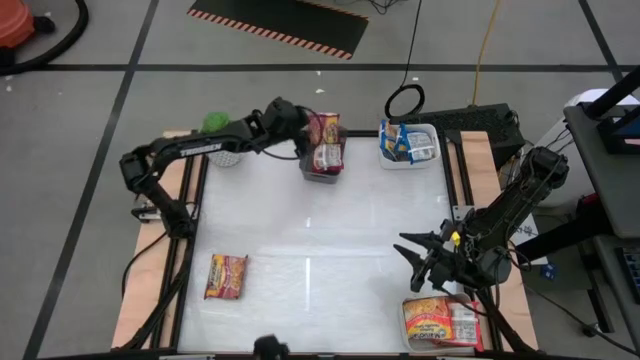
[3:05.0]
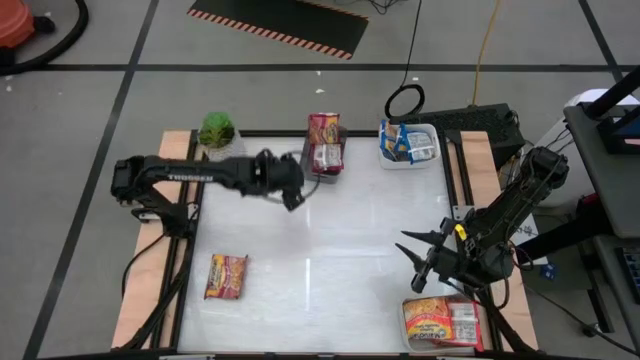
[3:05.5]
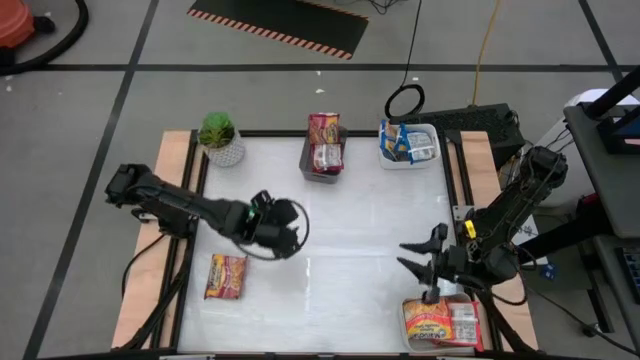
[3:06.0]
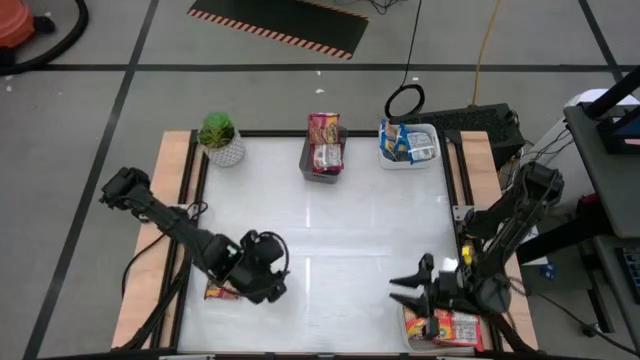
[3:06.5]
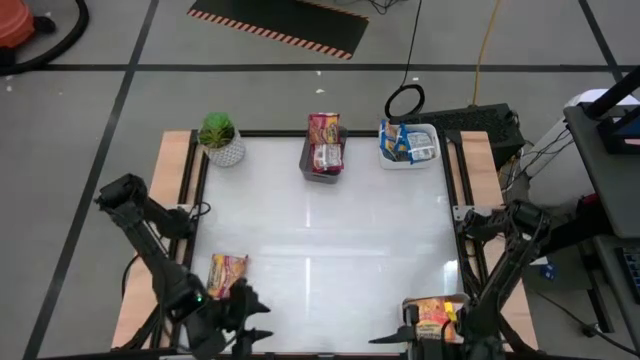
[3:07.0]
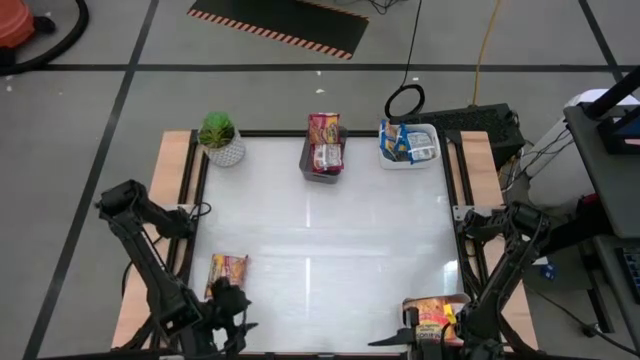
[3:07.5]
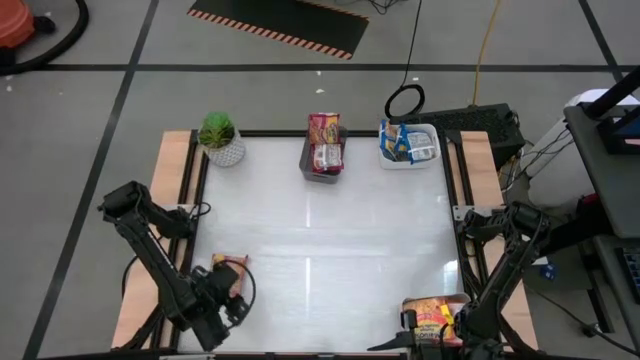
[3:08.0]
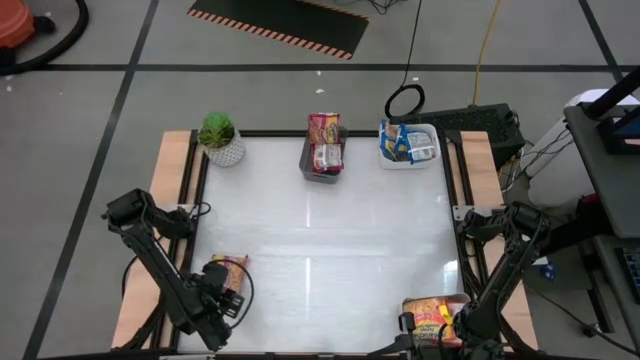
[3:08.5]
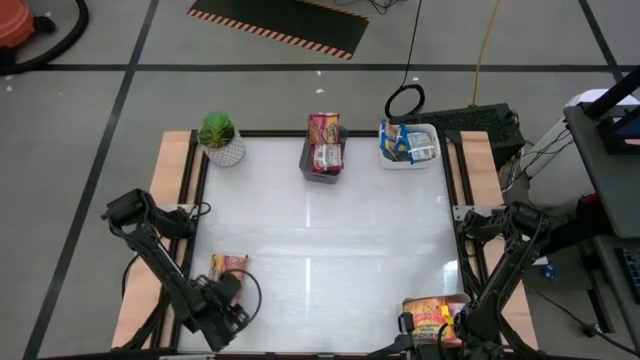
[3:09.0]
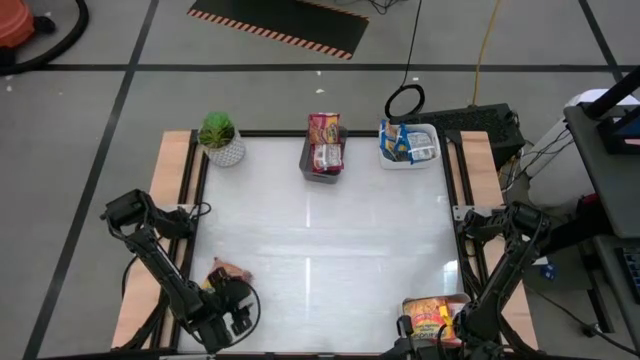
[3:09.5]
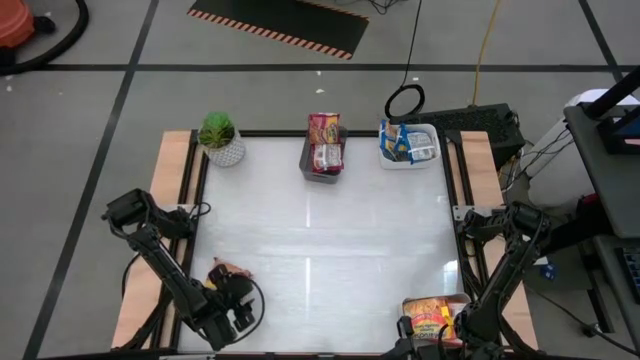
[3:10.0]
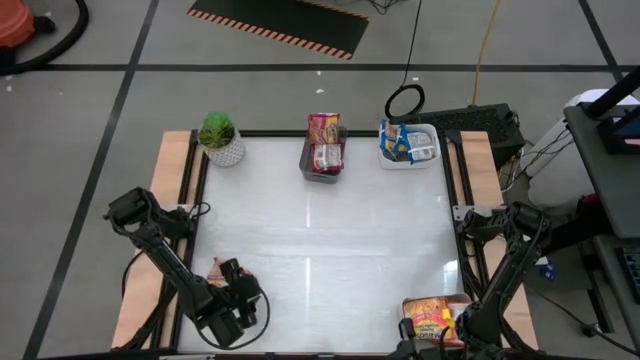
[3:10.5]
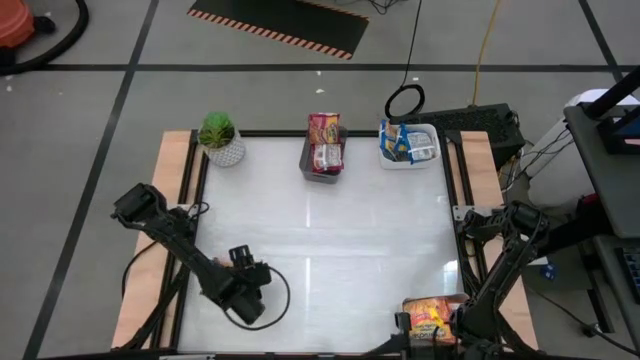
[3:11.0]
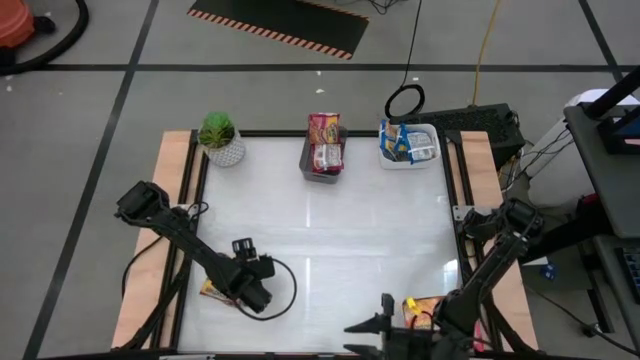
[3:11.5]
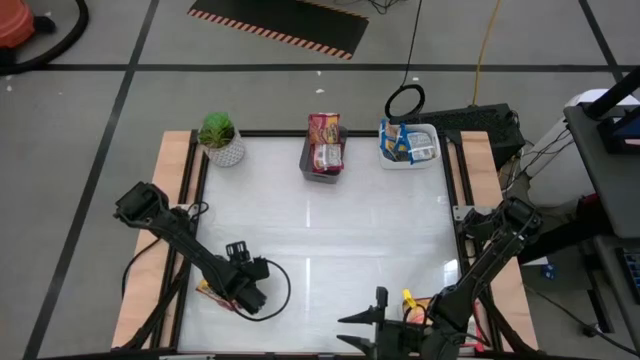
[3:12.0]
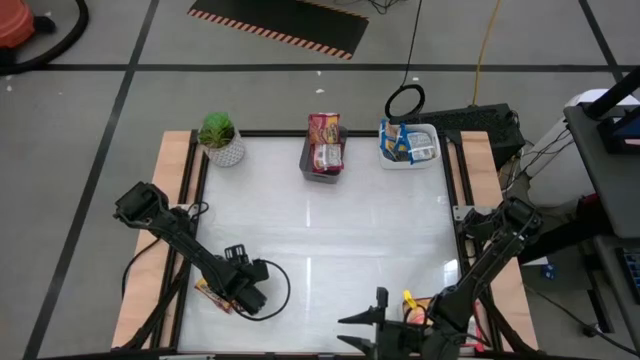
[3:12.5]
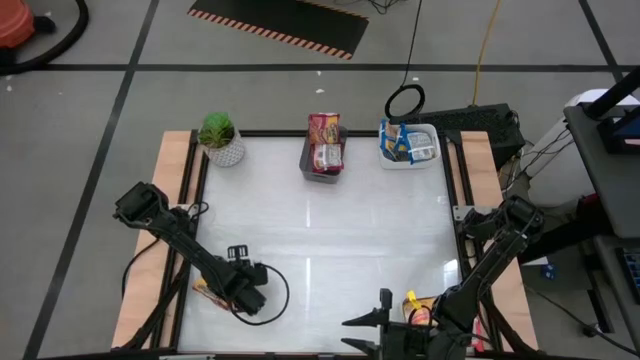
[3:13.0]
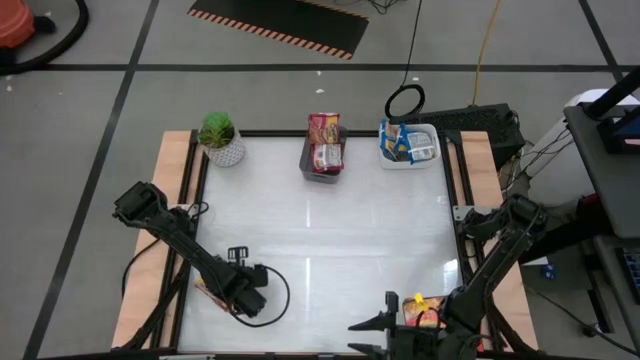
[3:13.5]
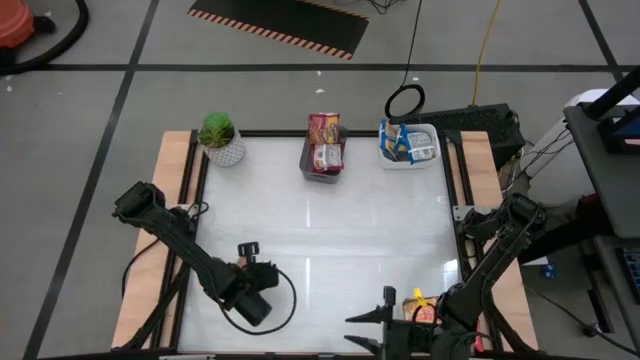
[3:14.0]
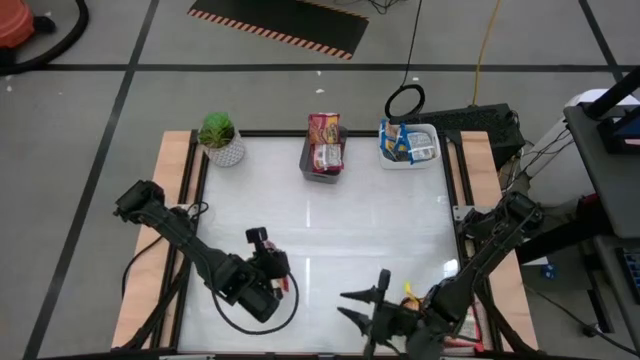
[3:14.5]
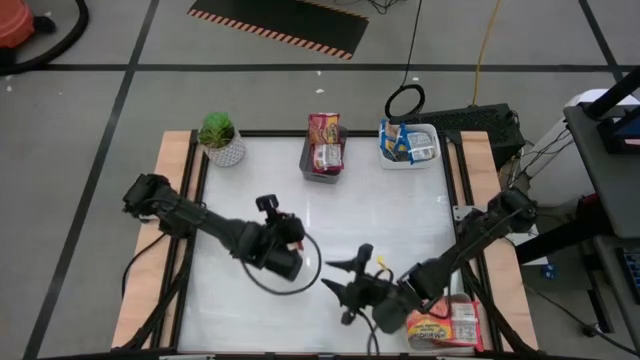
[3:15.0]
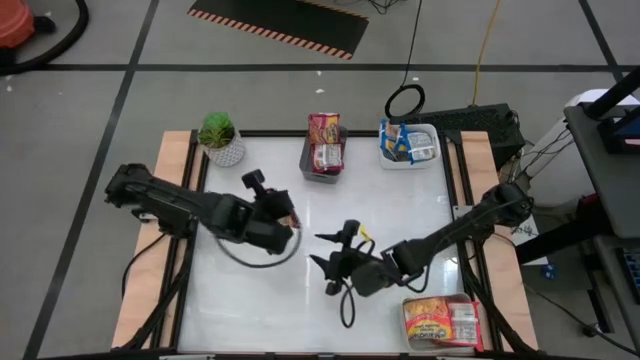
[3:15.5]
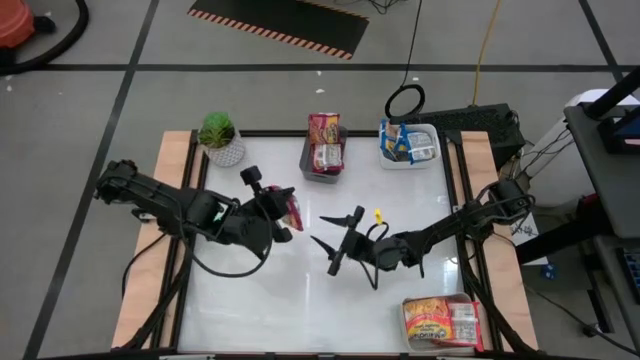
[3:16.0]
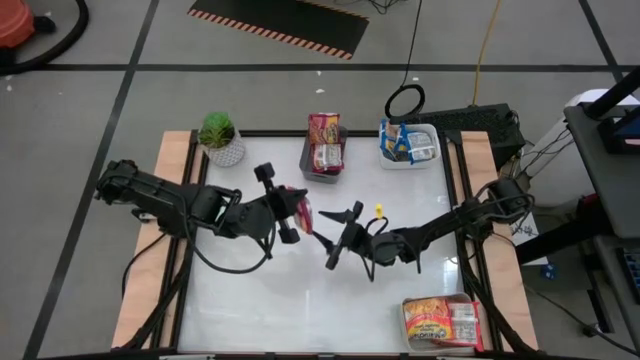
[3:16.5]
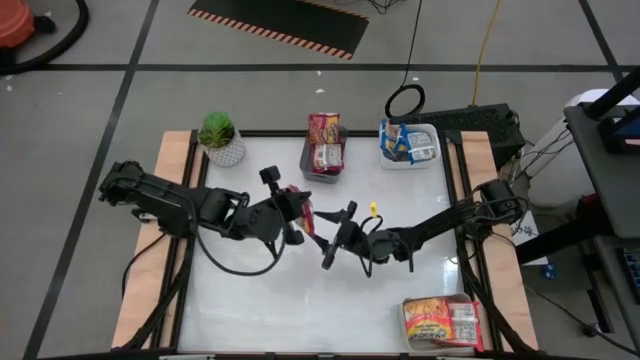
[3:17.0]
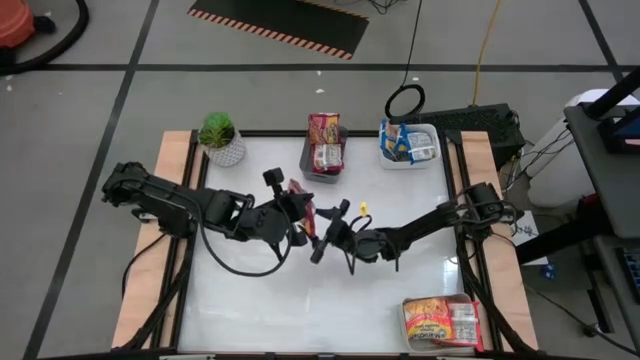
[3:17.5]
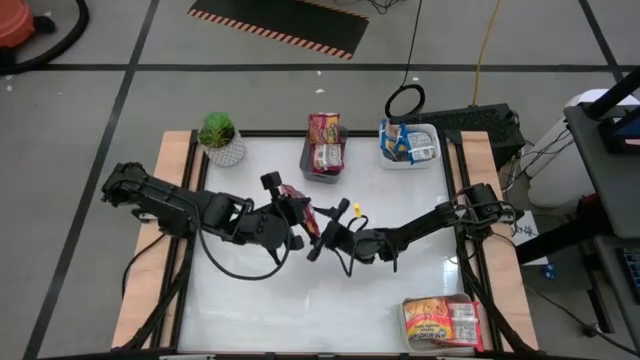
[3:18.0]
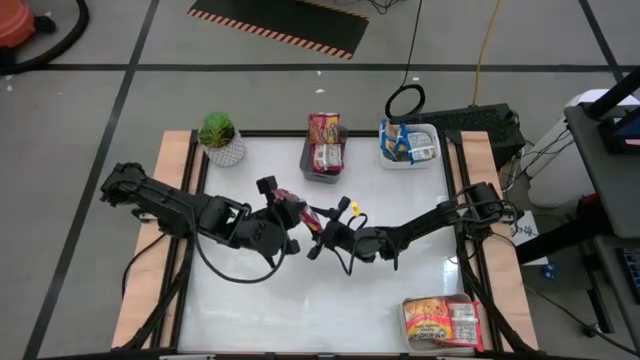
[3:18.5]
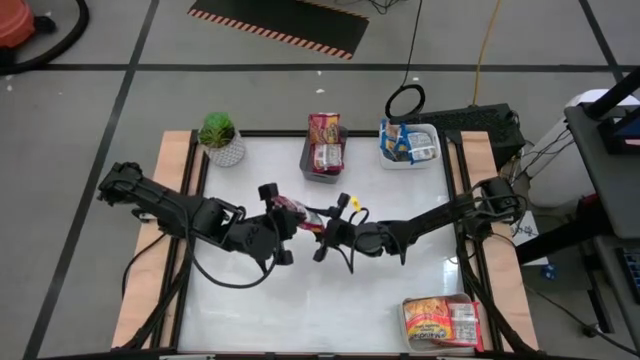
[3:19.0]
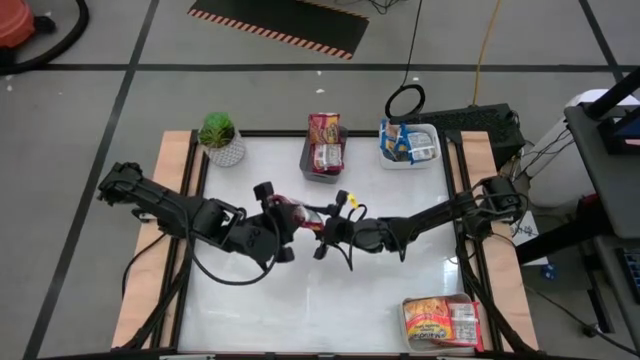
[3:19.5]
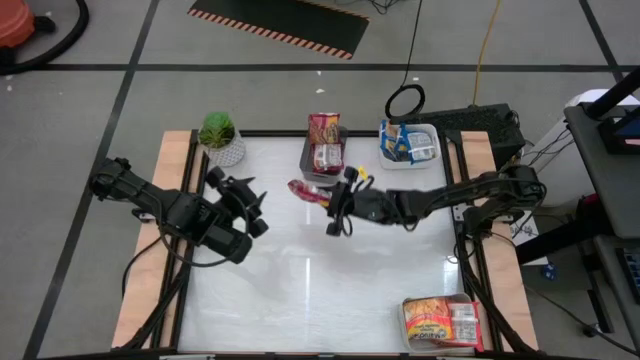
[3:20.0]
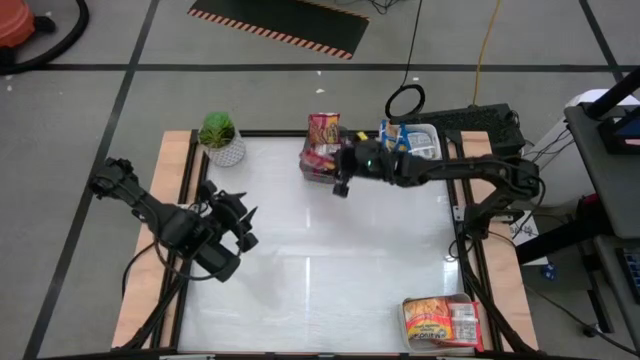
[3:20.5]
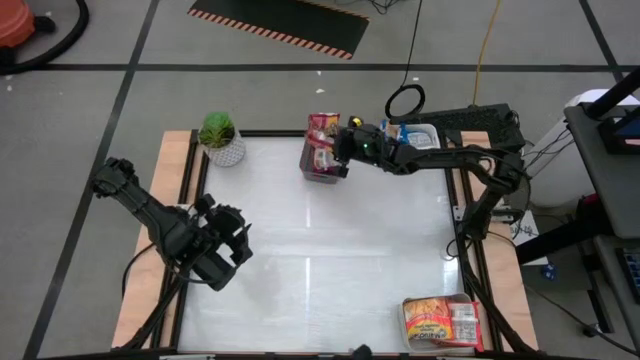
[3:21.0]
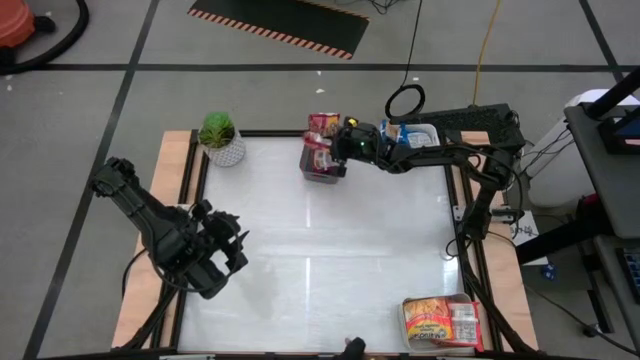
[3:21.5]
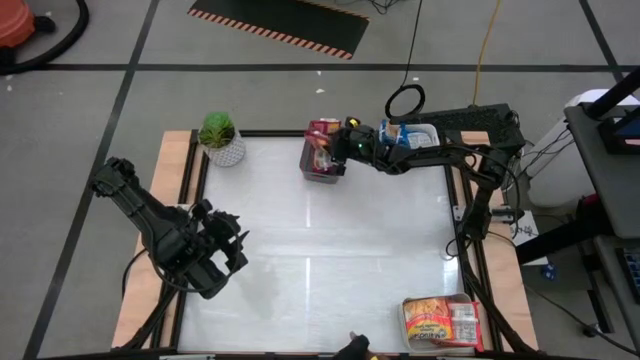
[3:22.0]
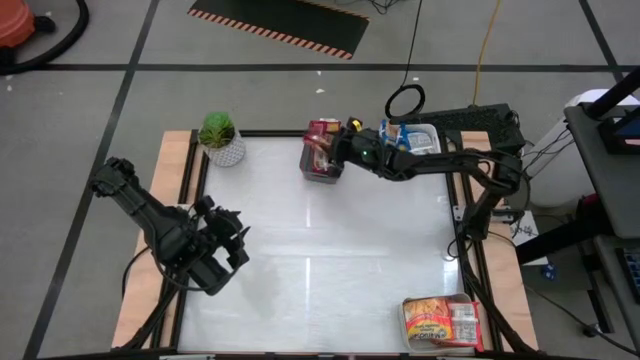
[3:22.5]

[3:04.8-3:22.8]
Task: Sort Maruchan noodles
Put the red noodle pack into the black bin

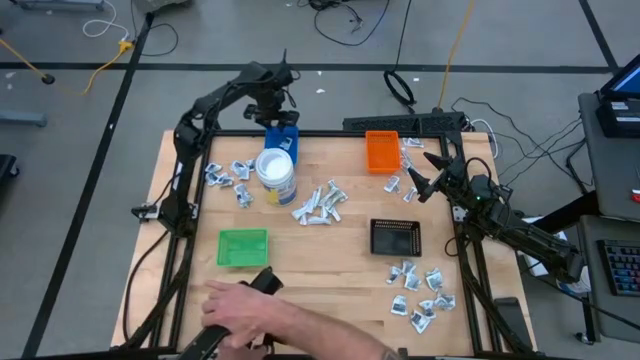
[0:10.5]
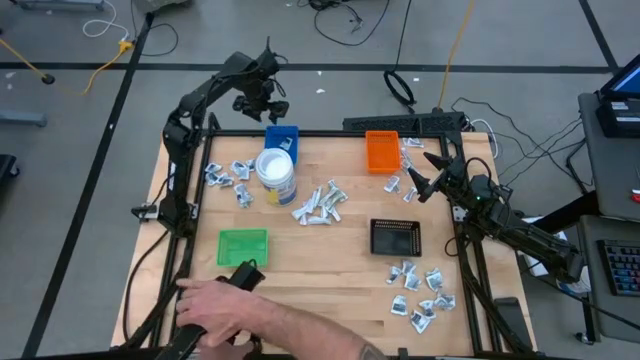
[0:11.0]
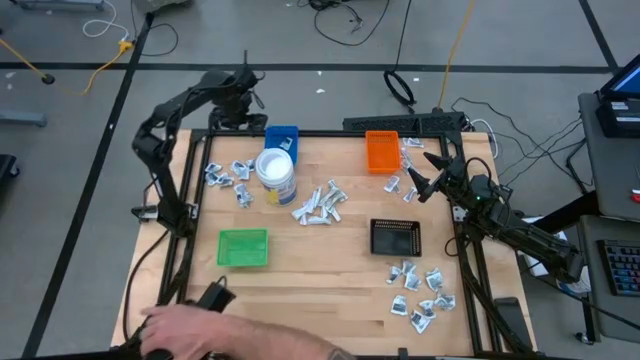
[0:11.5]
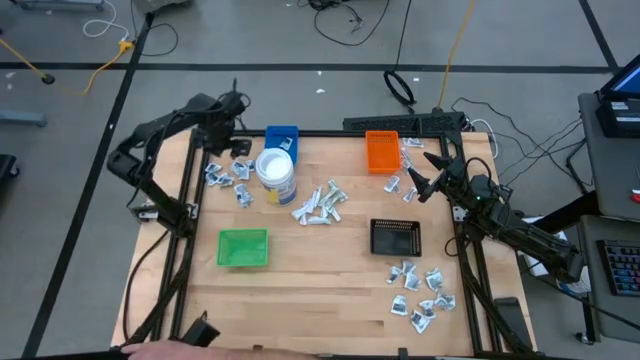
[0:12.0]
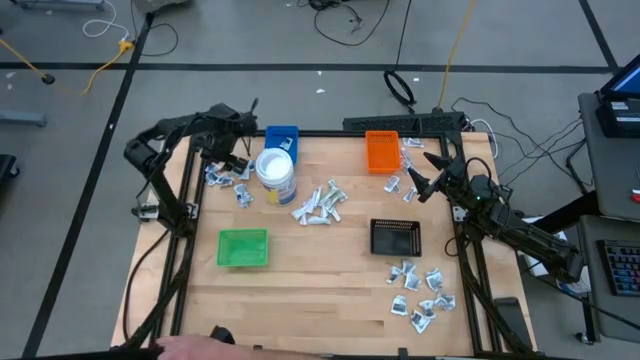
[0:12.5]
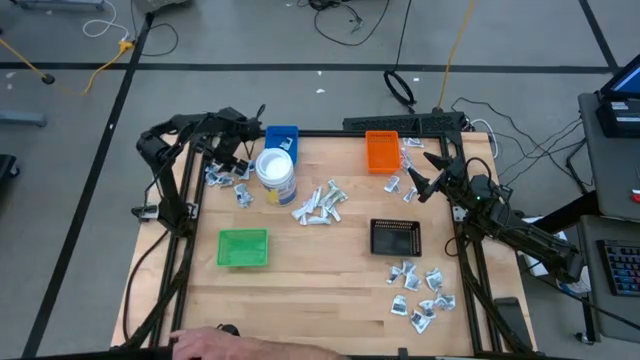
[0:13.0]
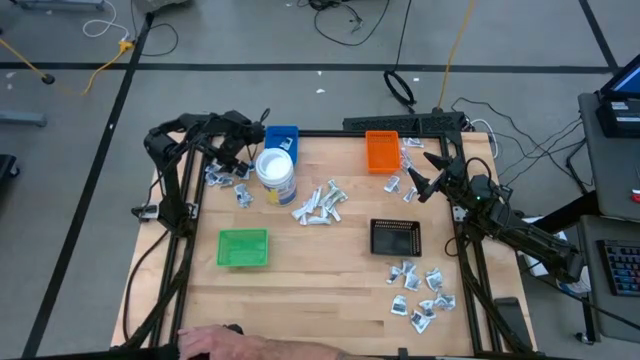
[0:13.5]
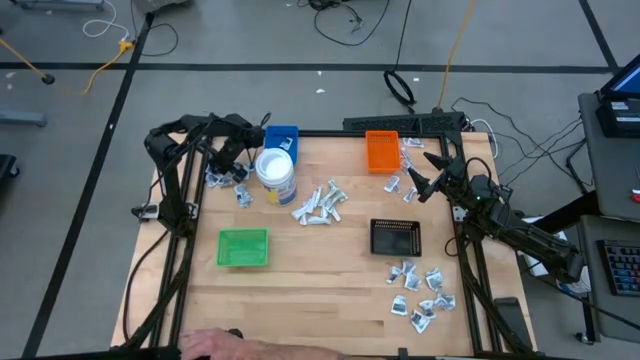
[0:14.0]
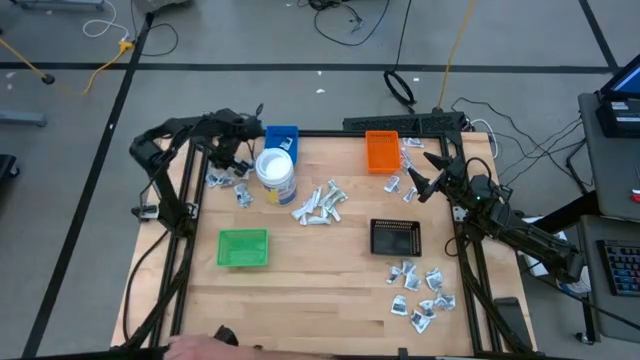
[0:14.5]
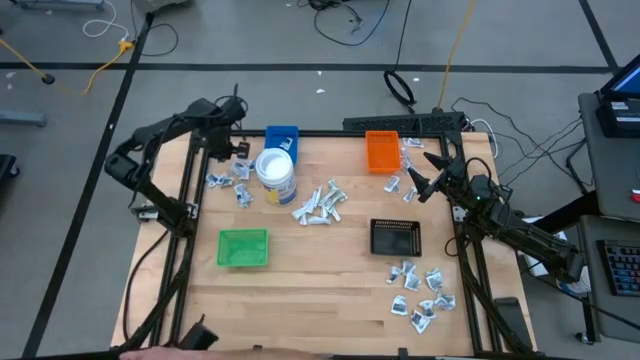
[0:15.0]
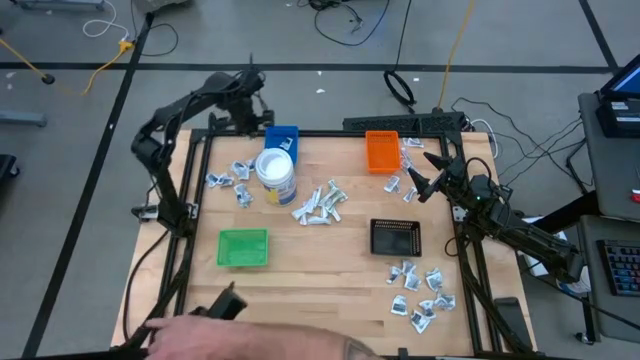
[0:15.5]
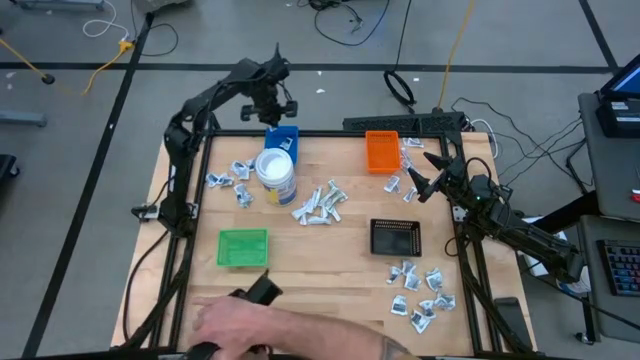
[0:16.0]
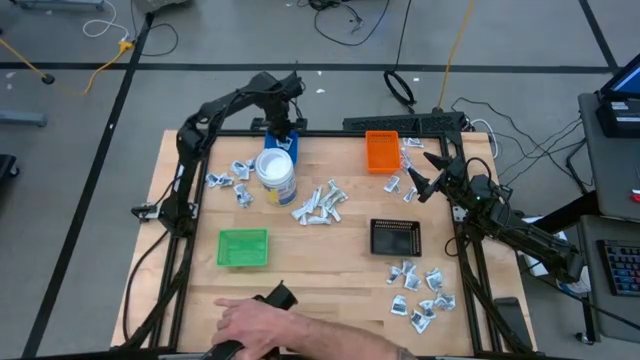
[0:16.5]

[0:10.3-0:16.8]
Task: Pick & Place First Aid Supplies
Put the blue alcohol pad into the blue bin
